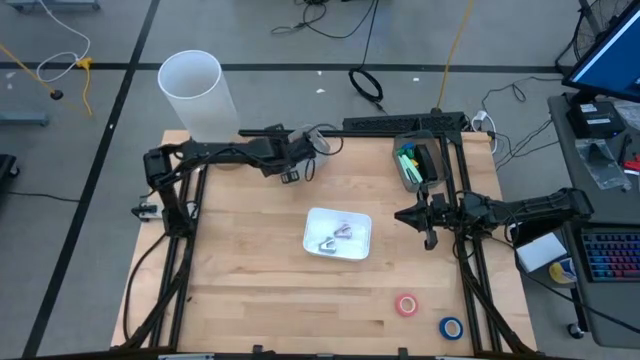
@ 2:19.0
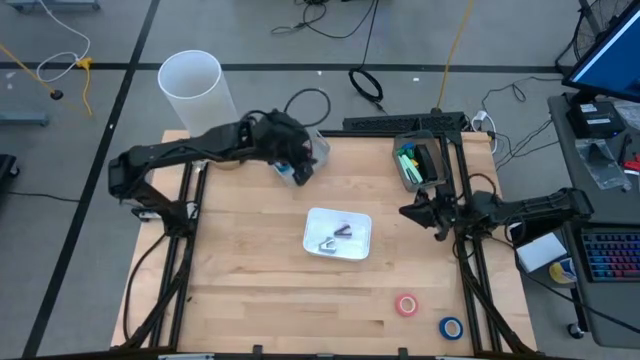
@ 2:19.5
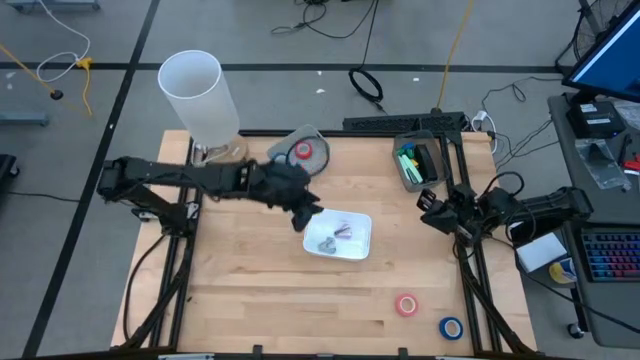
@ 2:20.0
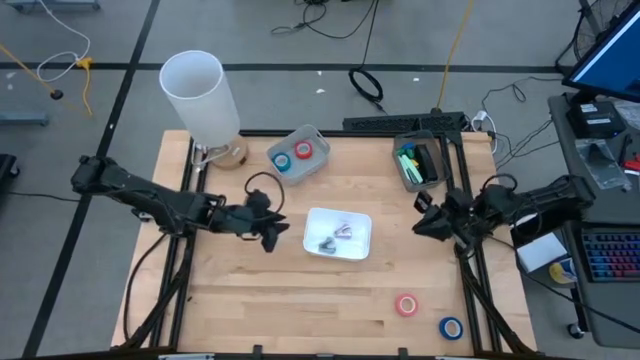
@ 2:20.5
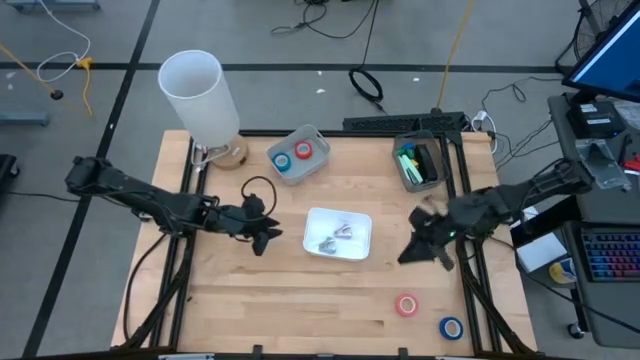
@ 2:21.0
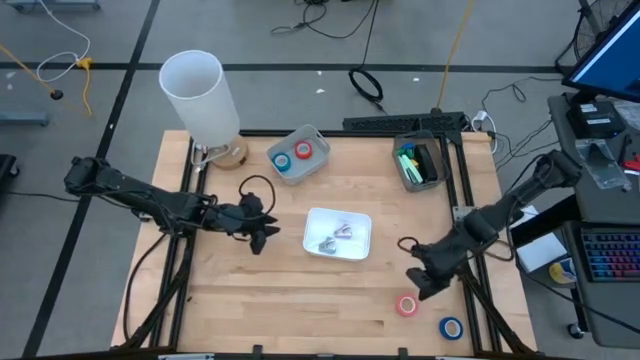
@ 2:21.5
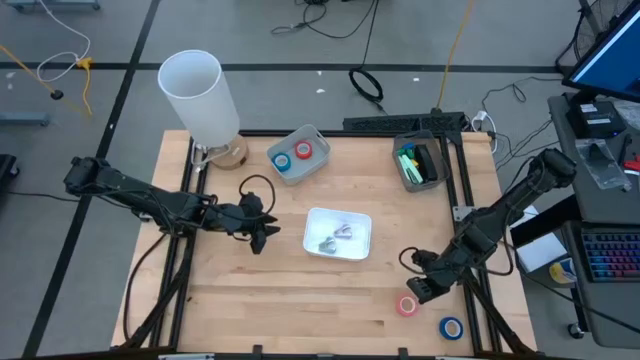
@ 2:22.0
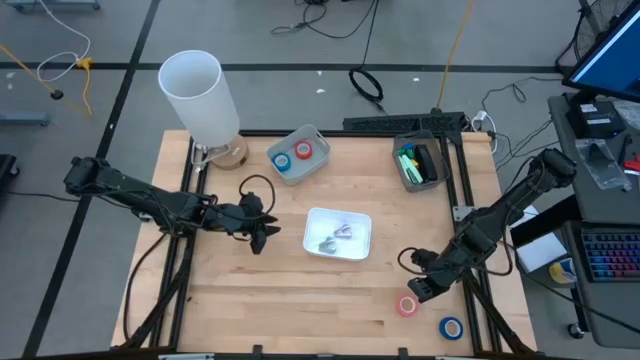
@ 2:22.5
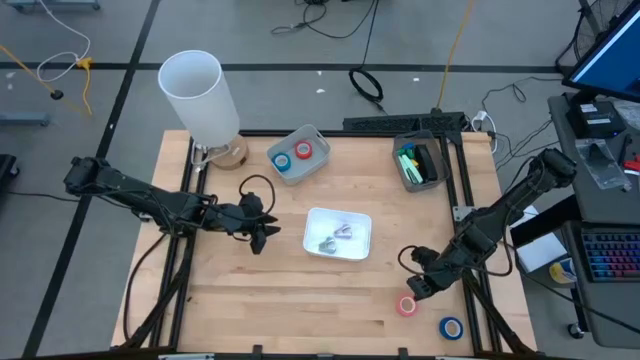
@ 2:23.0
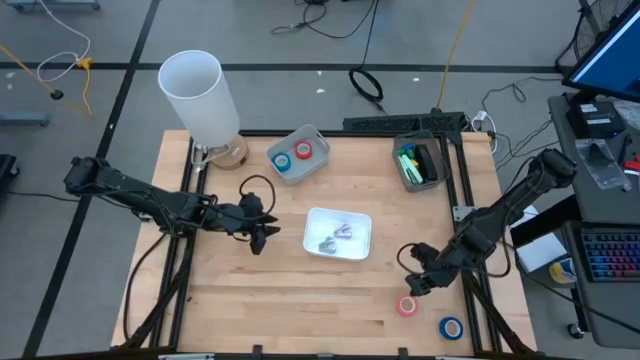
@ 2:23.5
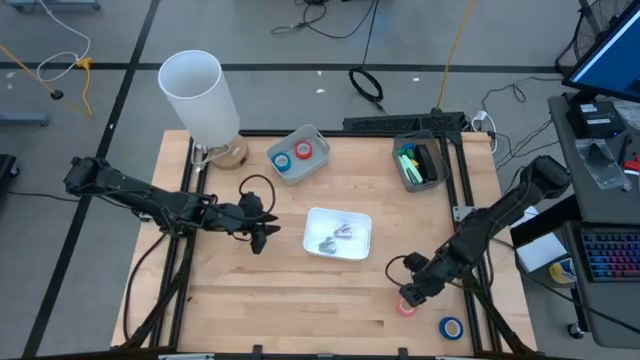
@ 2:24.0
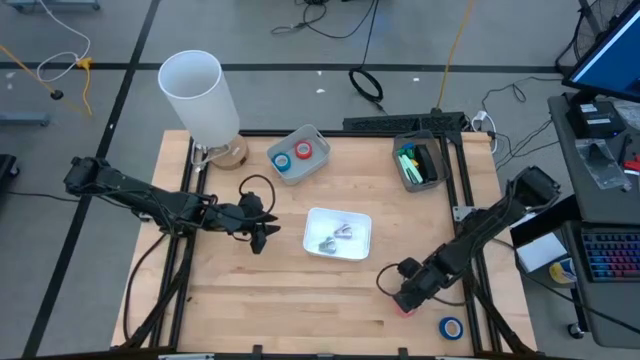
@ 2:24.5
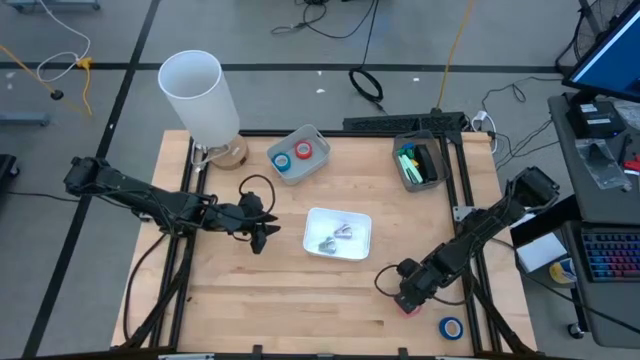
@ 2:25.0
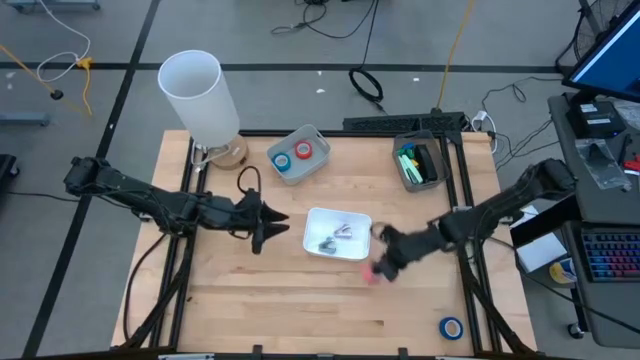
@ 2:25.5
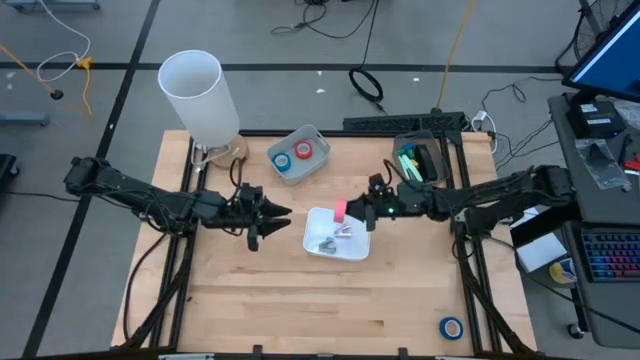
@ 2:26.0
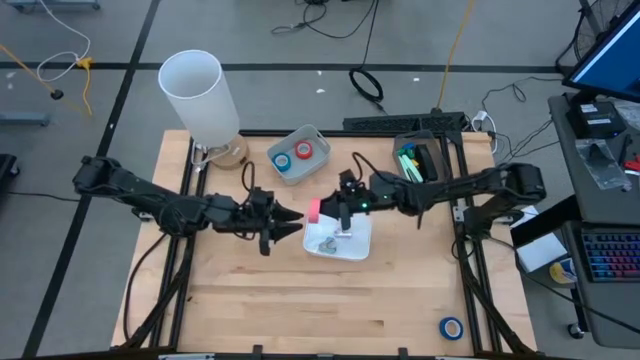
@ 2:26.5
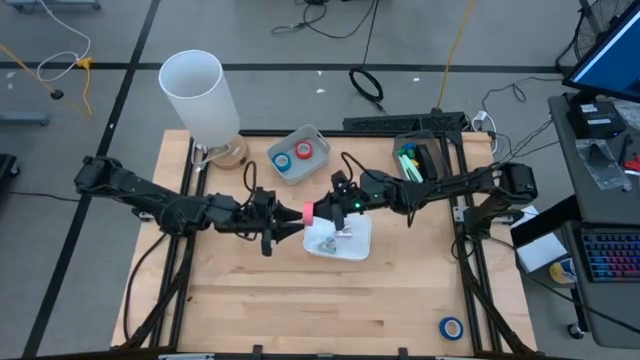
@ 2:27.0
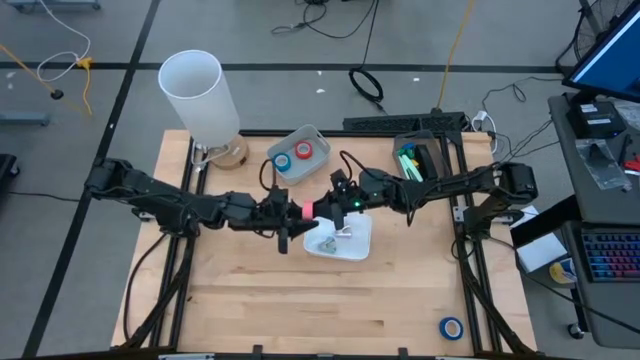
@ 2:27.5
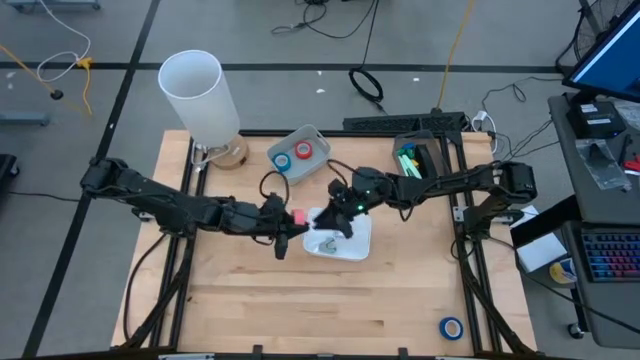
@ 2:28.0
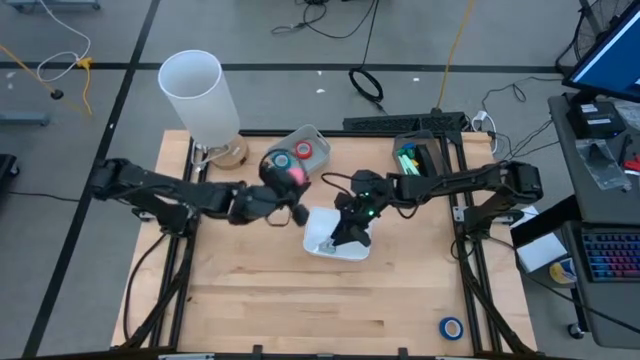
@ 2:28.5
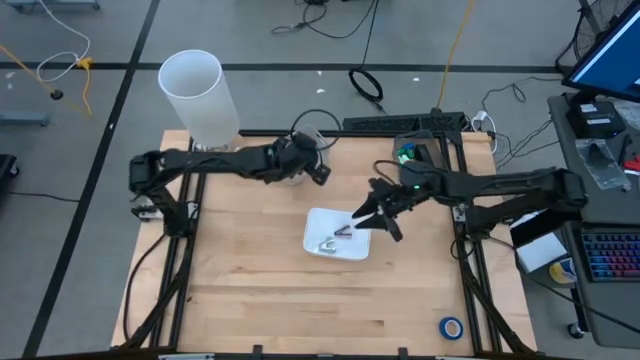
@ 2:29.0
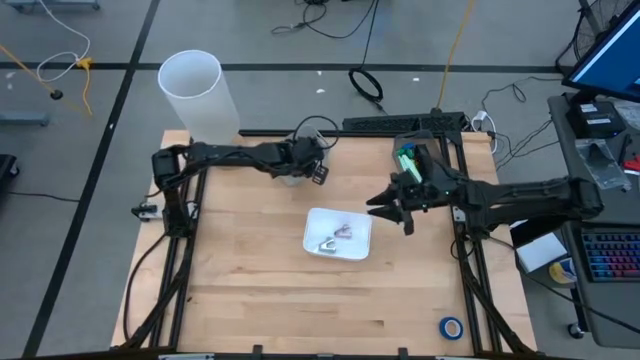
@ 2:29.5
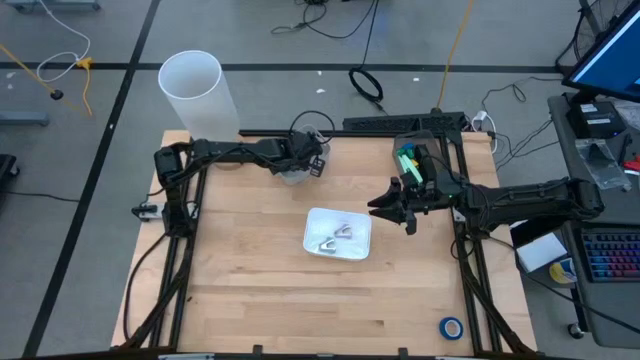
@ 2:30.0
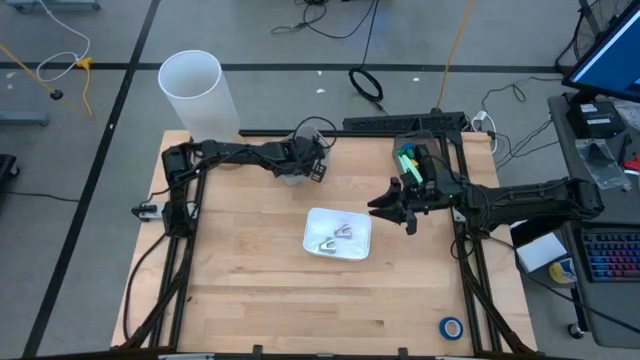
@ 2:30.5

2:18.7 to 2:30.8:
Task: Pick and place Stapler, Stapler remover, tape
Put the pink tape into the gray bin

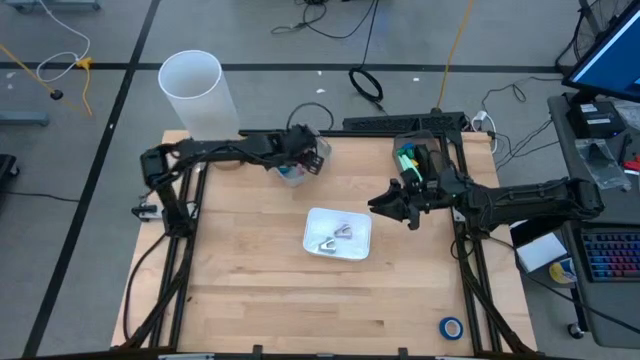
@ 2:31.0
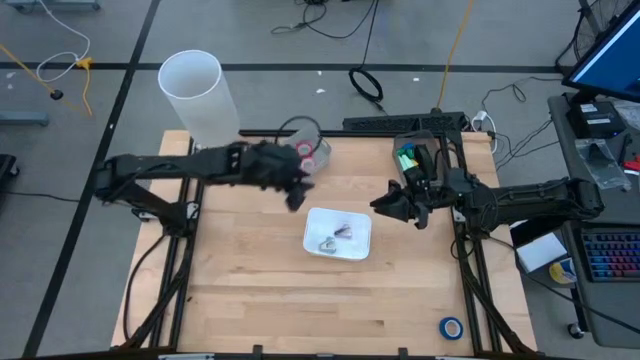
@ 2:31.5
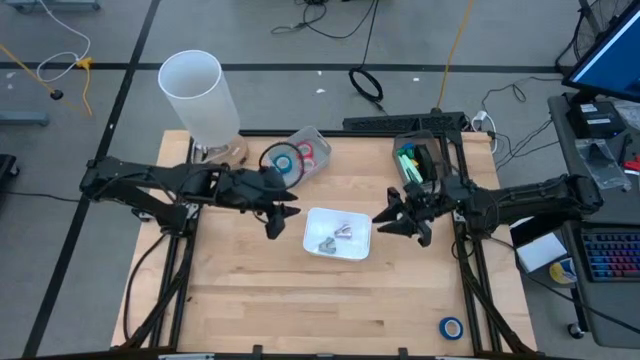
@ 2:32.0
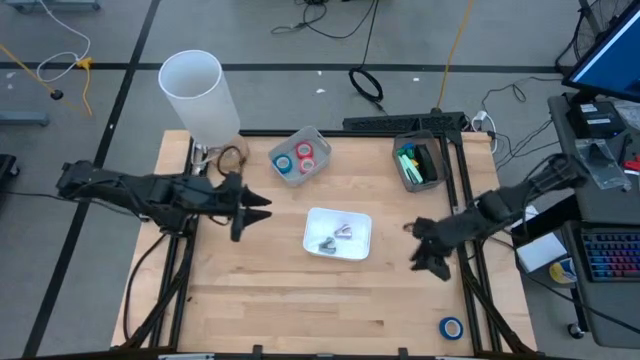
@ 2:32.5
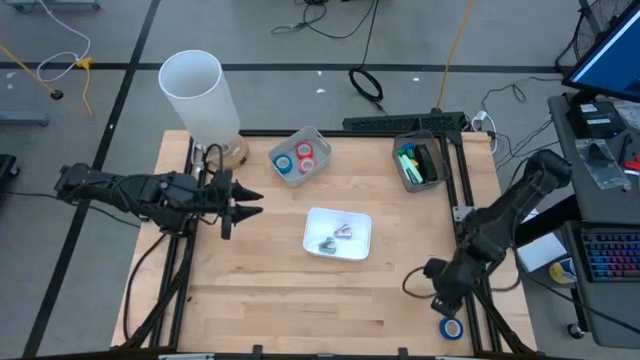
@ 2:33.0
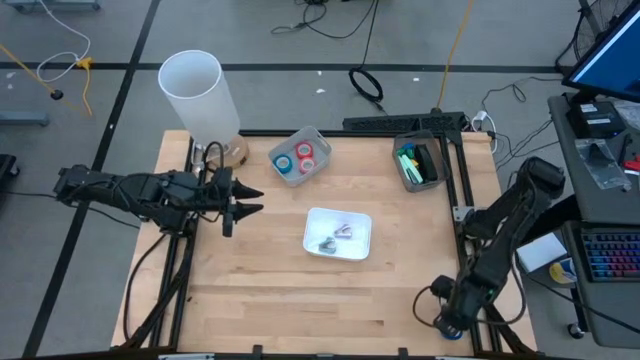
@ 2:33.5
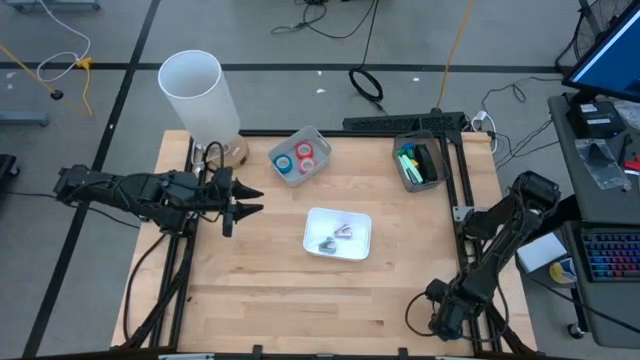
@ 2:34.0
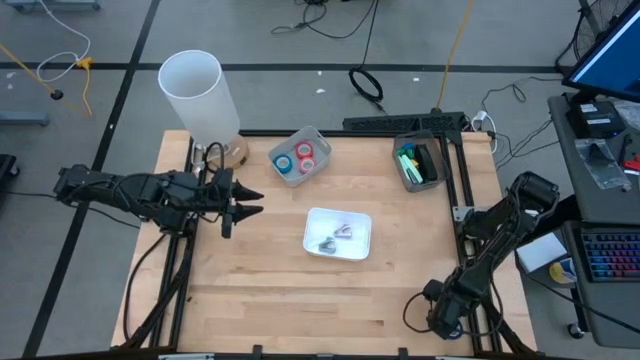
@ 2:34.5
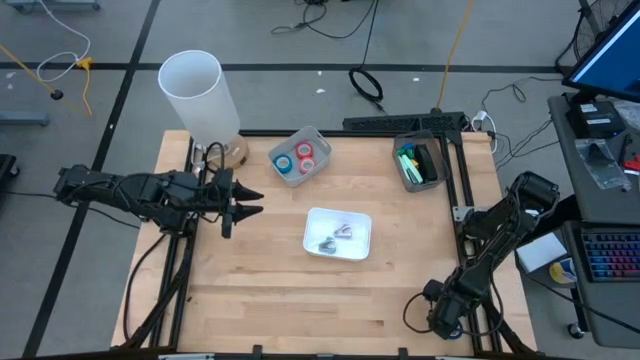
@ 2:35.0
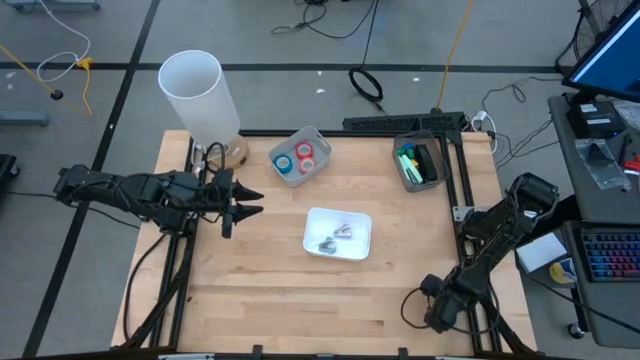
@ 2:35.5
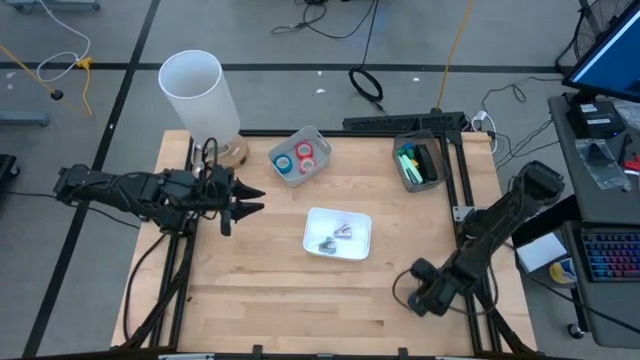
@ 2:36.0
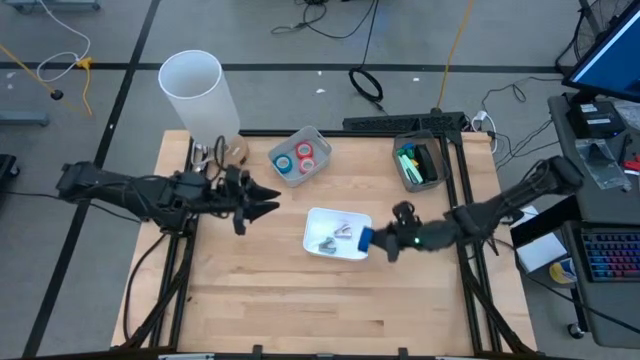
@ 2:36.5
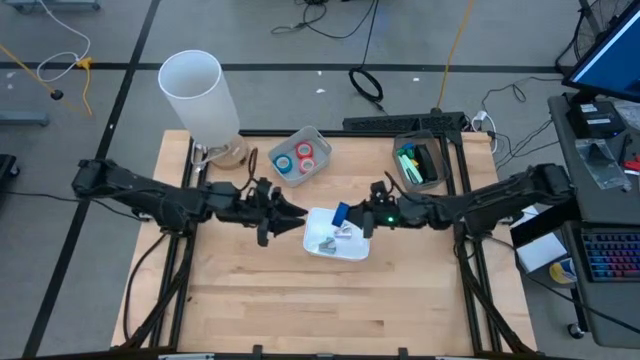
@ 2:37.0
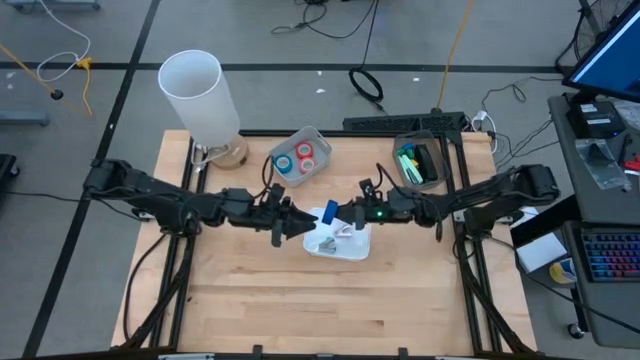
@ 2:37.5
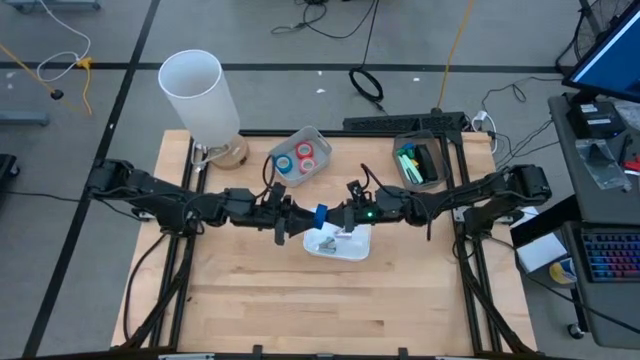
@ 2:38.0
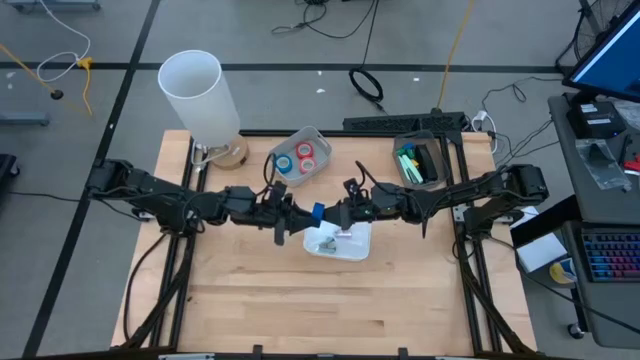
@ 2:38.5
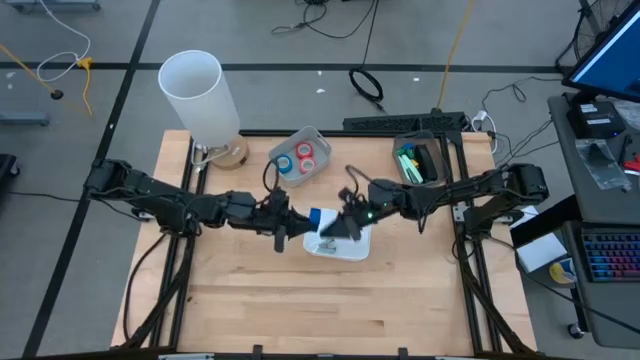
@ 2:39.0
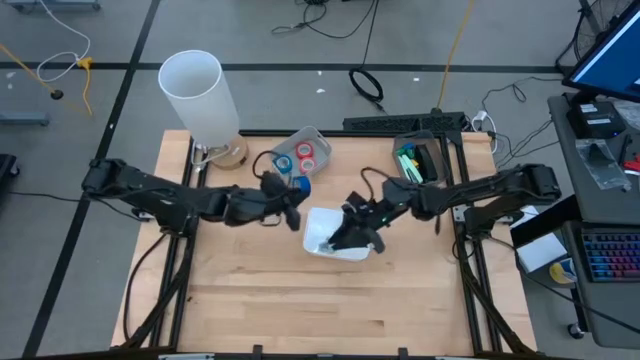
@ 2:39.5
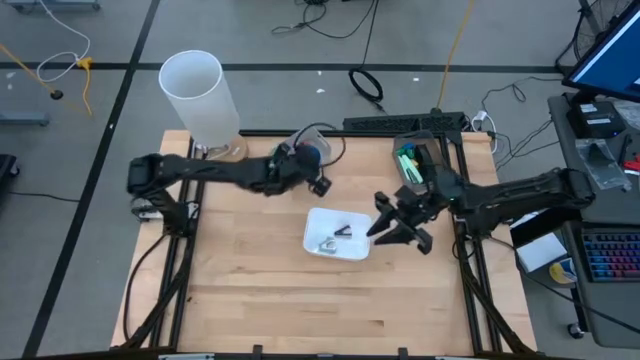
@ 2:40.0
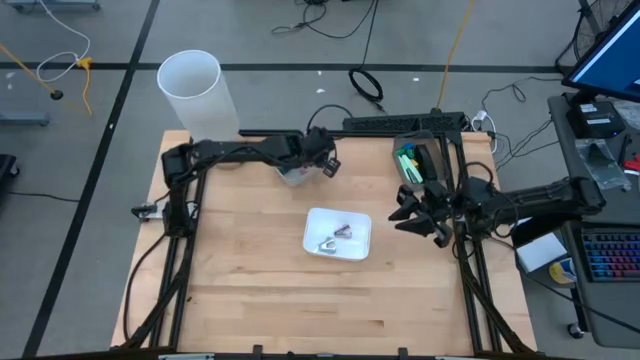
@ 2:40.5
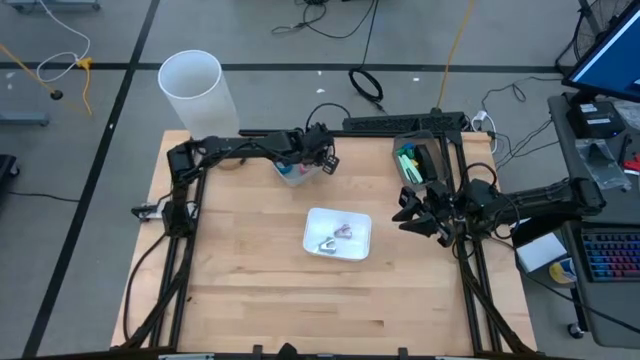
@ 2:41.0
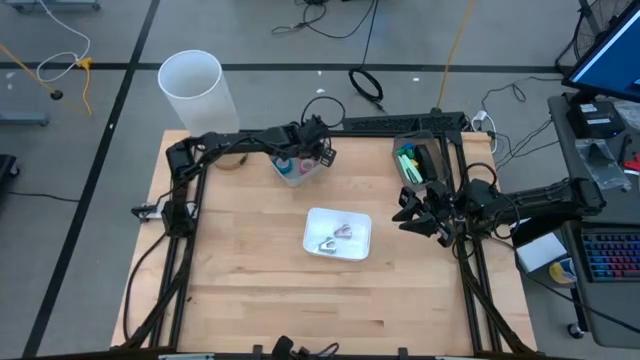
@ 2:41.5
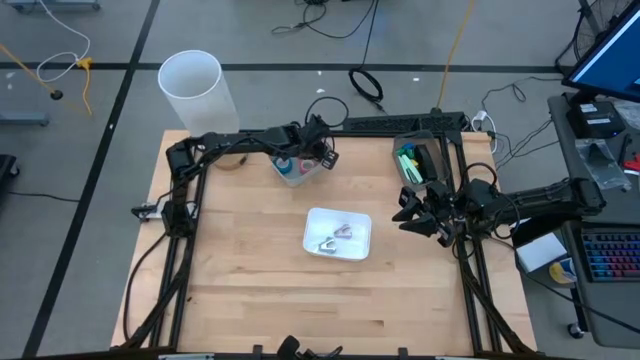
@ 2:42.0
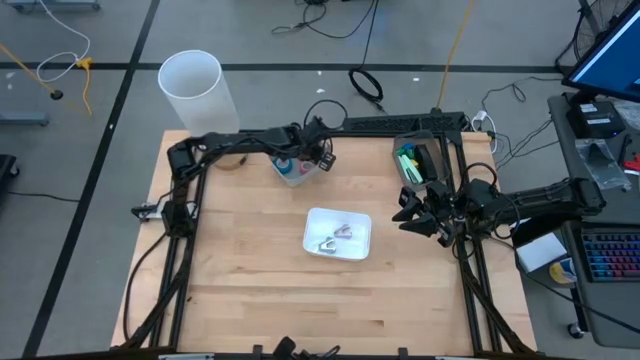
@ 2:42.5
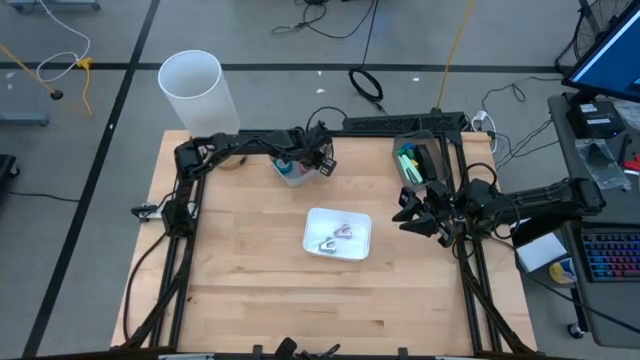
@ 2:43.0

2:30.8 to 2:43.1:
Put the dark blue tape into the gray bin
